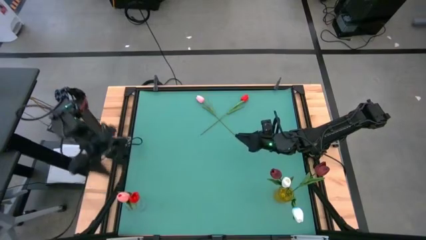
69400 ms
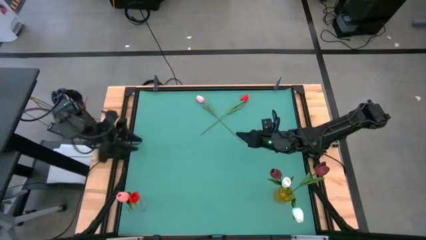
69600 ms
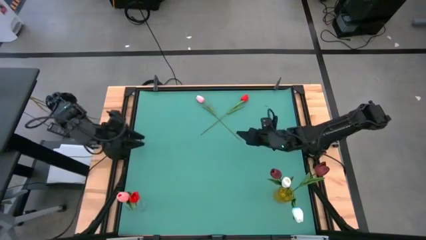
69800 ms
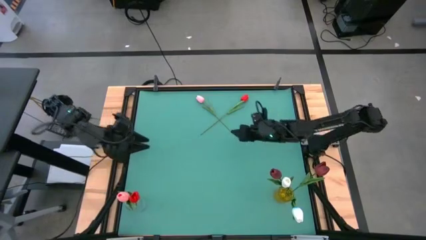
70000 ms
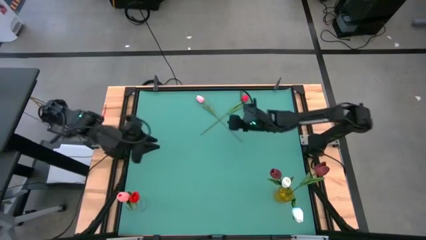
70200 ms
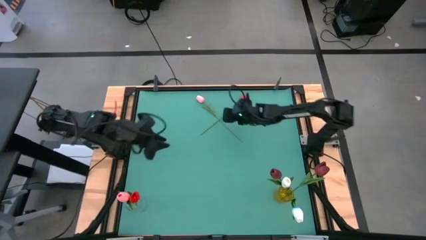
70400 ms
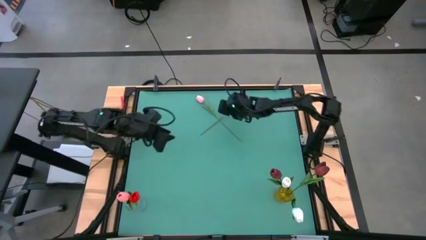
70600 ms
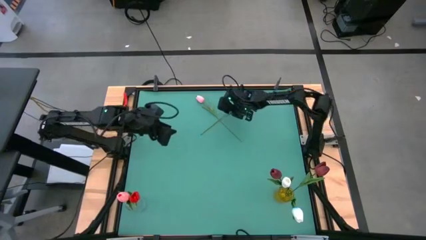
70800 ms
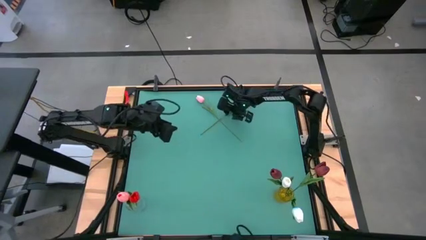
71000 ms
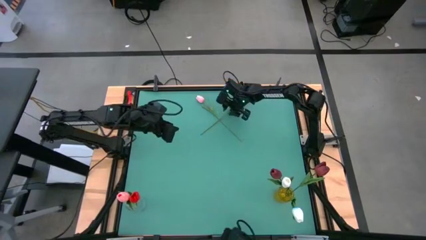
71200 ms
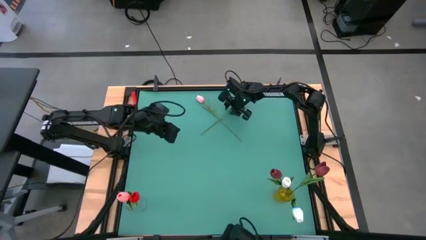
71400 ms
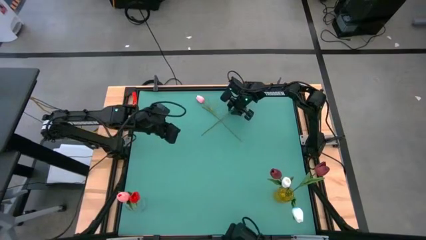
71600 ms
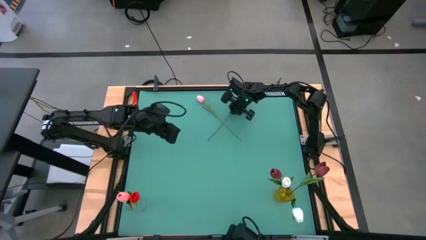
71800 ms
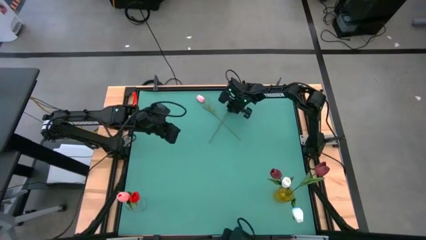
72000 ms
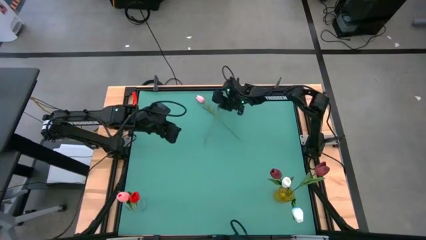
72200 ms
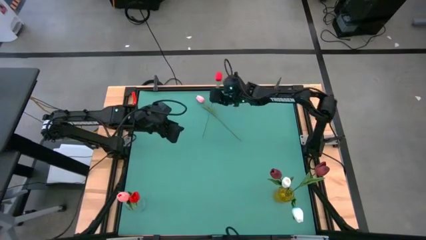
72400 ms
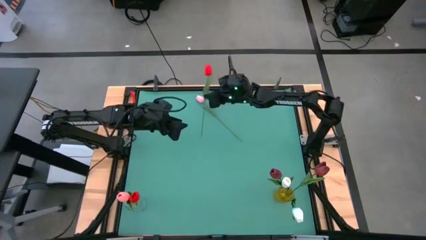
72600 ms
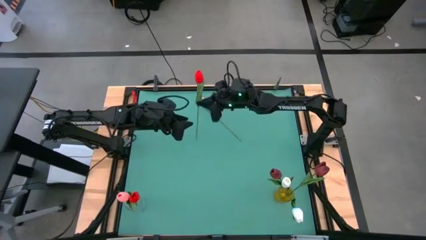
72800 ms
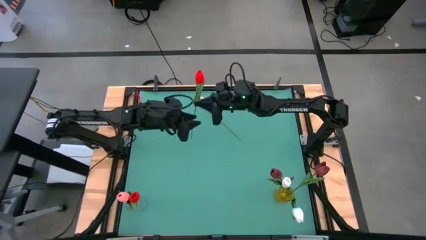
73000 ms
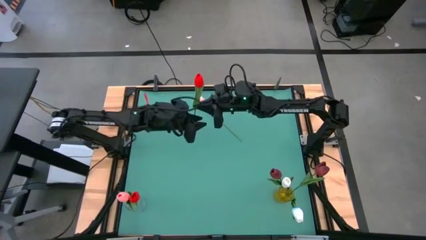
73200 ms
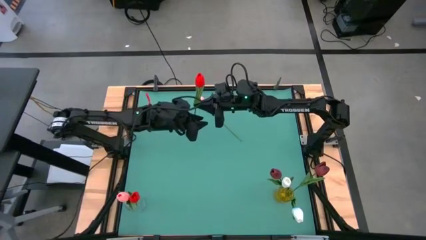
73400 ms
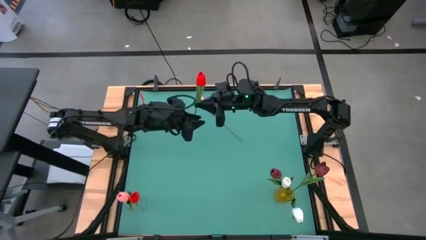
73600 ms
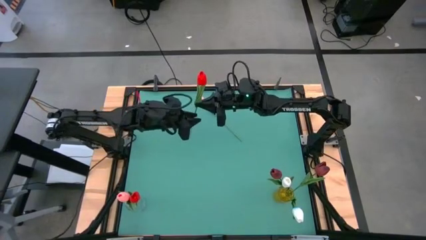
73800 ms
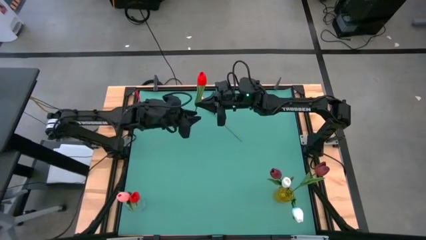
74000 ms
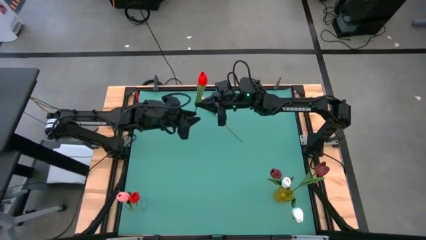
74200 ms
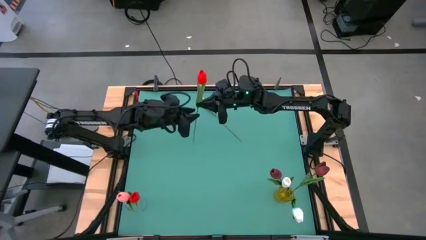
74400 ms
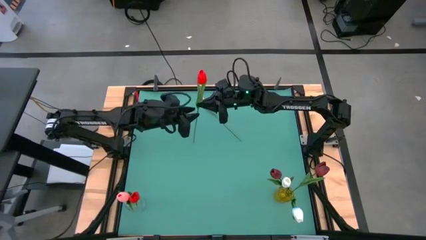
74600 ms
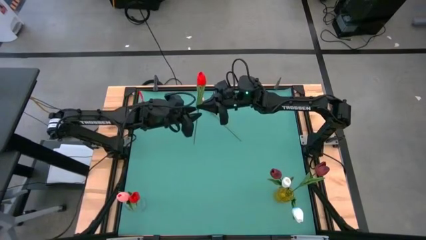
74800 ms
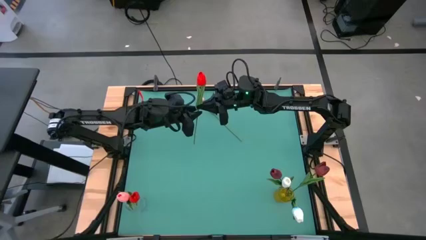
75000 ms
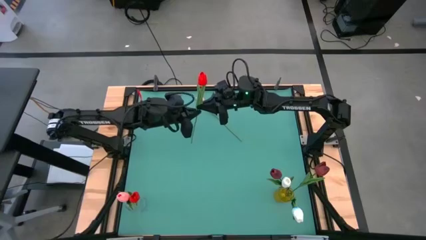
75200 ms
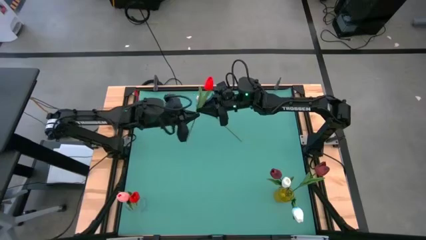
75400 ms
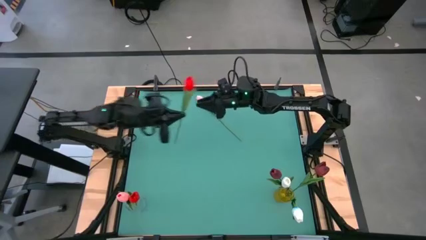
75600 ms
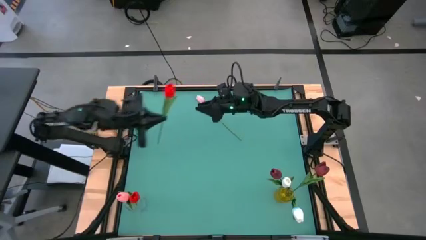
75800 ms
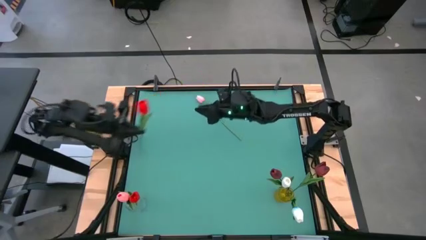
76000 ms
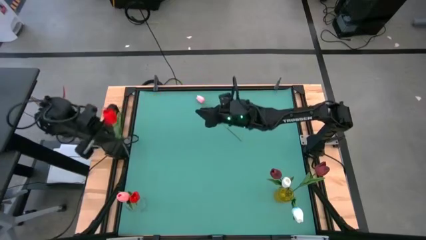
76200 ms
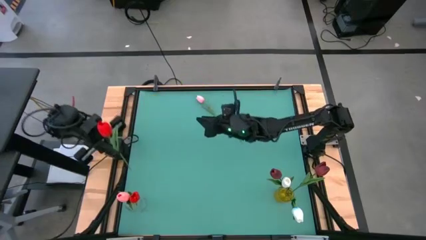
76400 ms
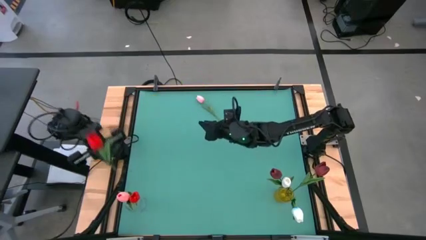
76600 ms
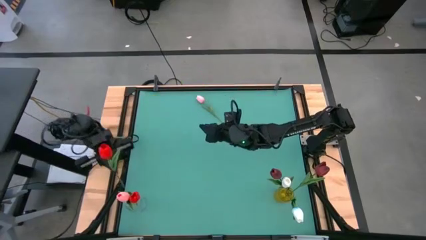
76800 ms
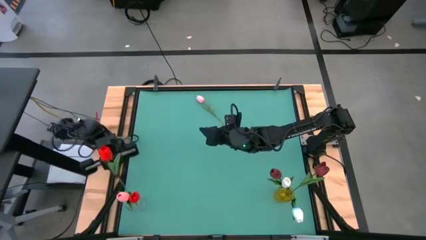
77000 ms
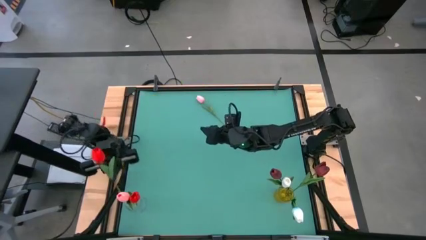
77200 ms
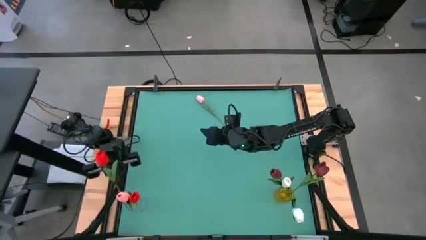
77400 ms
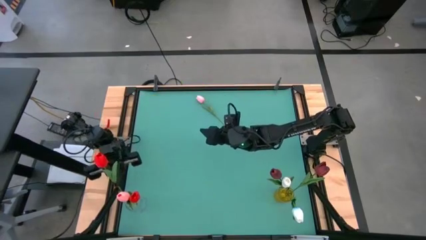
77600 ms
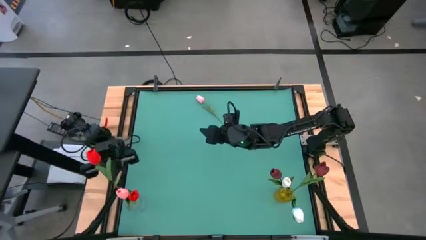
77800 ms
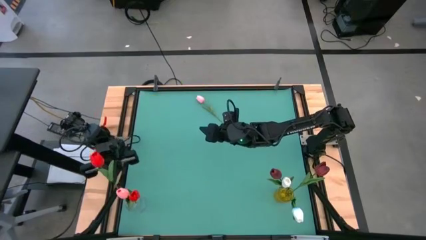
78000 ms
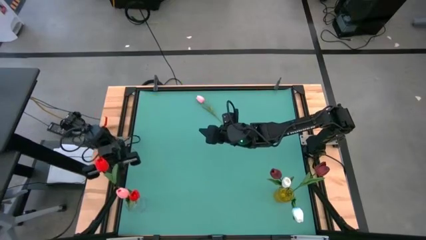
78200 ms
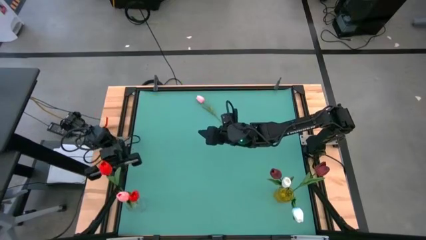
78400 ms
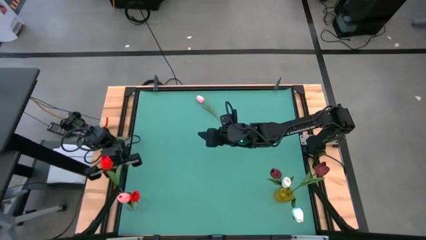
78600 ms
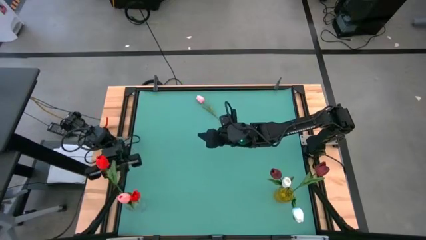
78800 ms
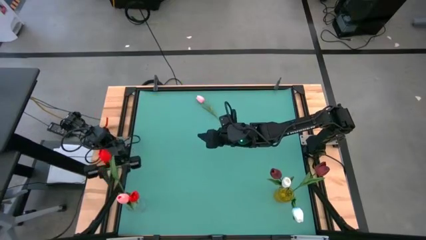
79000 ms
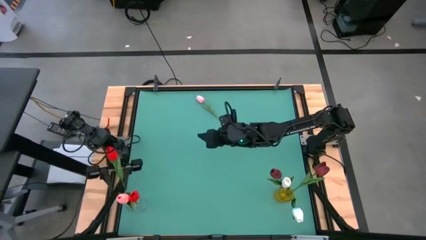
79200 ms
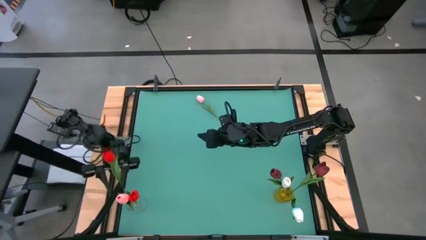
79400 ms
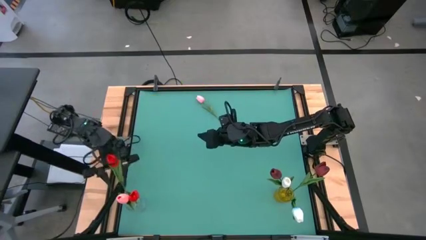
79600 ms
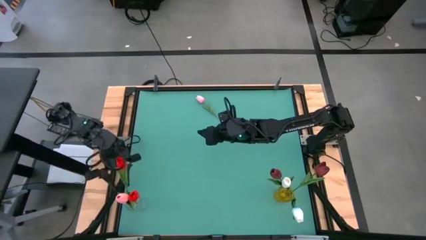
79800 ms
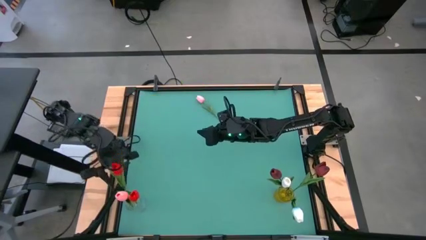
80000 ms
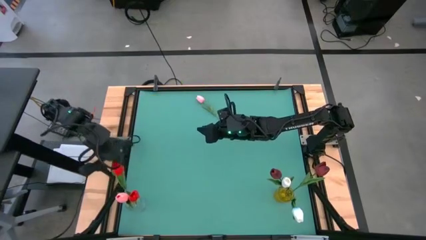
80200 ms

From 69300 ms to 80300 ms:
Task: Sort flowers into vase by color
Put the red tulip into the transparent flower vase
